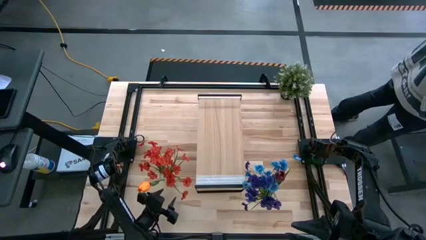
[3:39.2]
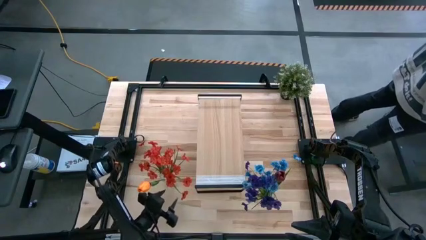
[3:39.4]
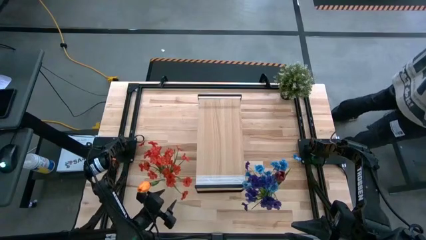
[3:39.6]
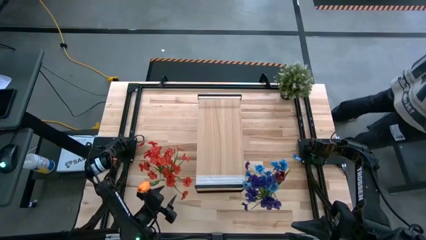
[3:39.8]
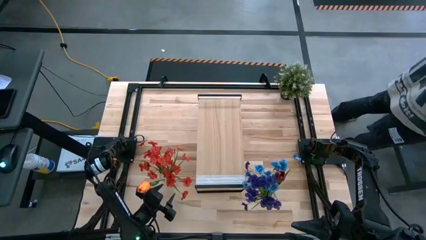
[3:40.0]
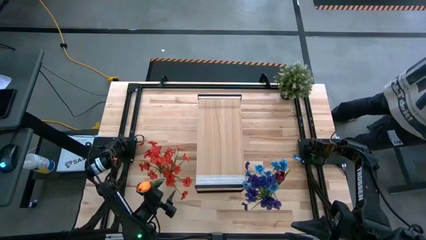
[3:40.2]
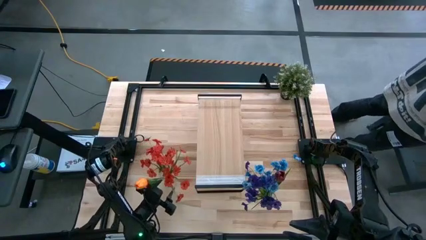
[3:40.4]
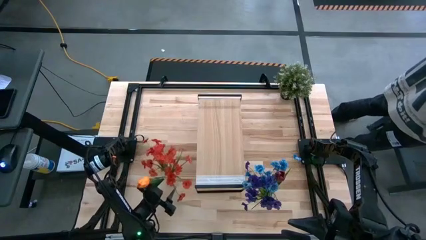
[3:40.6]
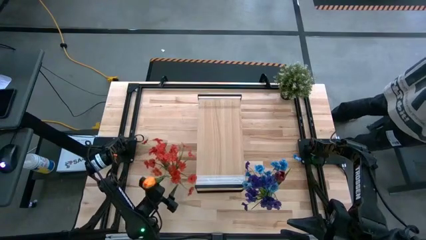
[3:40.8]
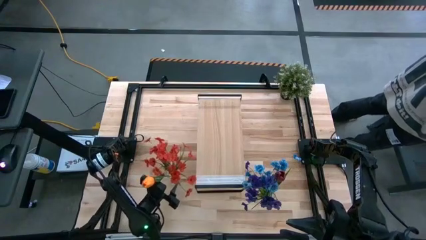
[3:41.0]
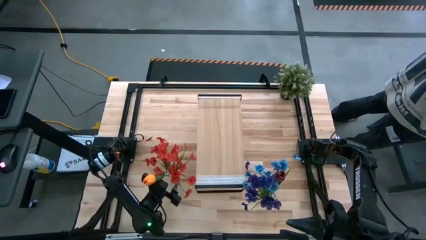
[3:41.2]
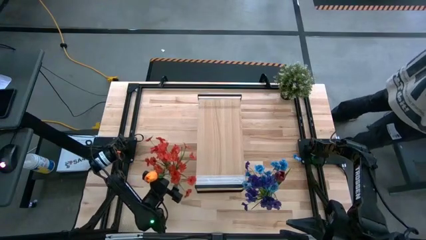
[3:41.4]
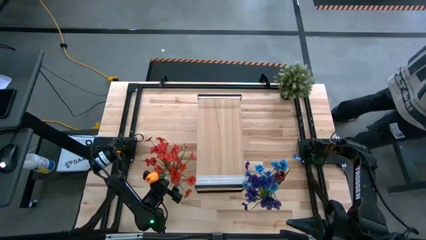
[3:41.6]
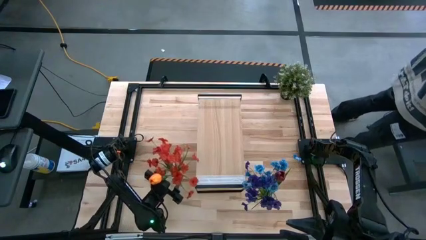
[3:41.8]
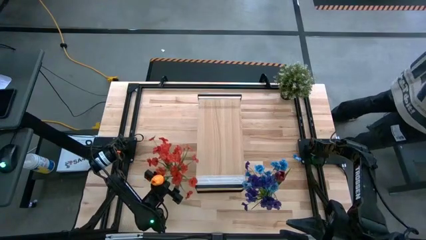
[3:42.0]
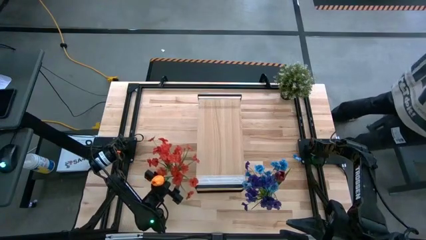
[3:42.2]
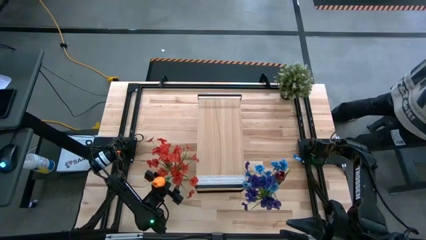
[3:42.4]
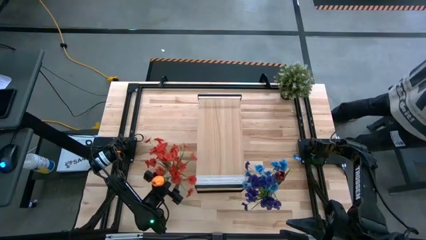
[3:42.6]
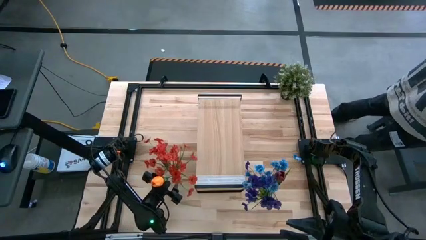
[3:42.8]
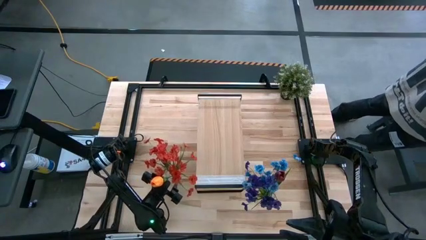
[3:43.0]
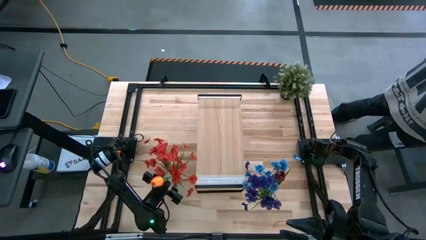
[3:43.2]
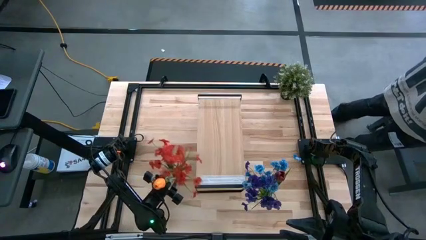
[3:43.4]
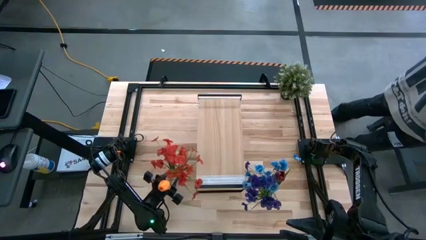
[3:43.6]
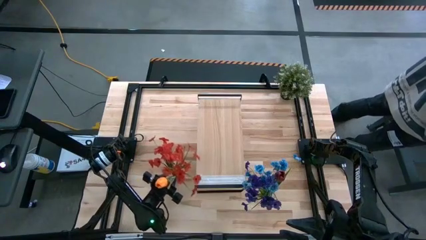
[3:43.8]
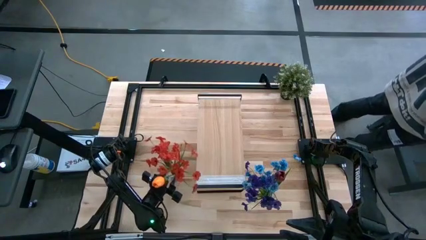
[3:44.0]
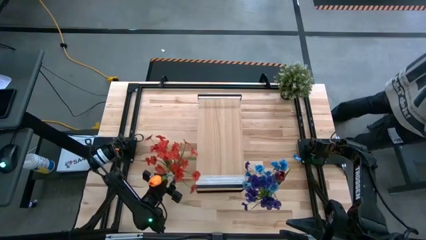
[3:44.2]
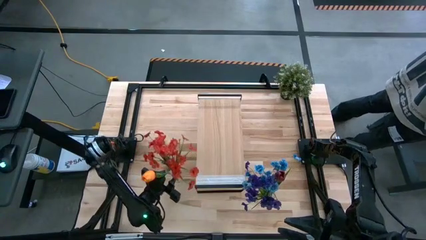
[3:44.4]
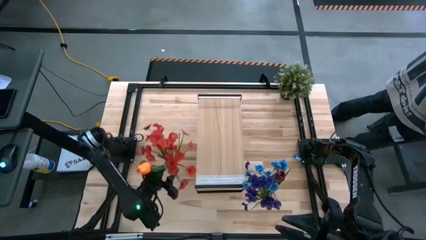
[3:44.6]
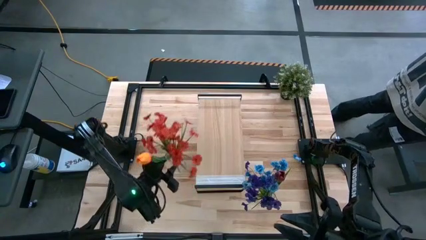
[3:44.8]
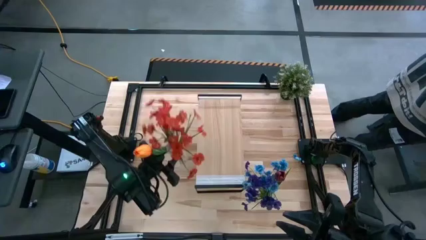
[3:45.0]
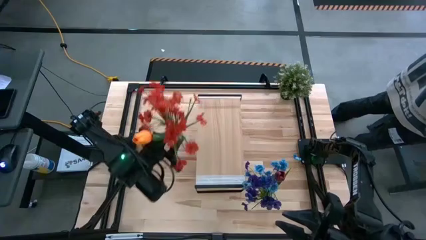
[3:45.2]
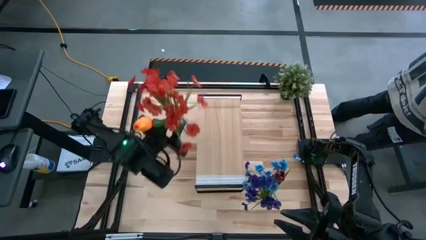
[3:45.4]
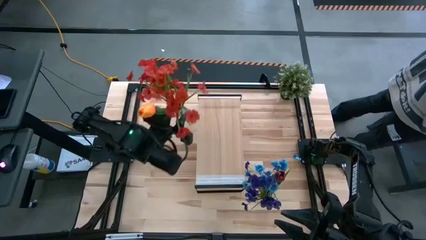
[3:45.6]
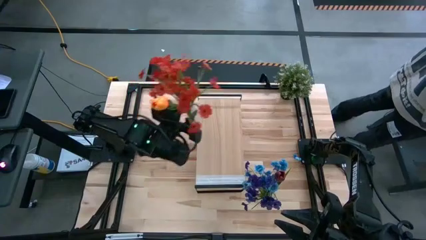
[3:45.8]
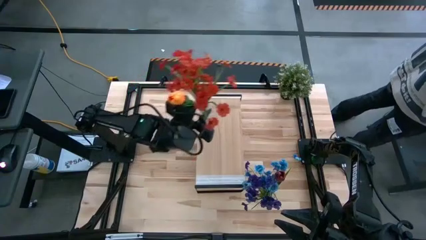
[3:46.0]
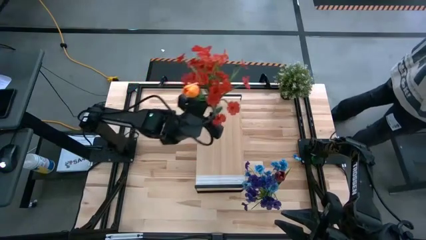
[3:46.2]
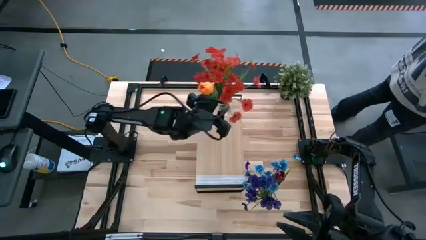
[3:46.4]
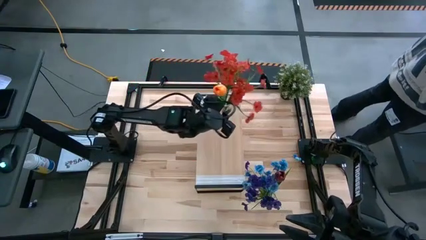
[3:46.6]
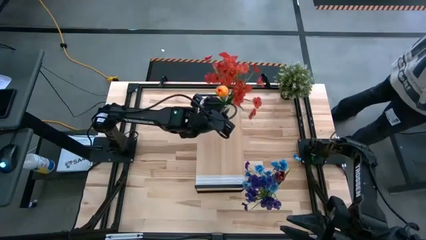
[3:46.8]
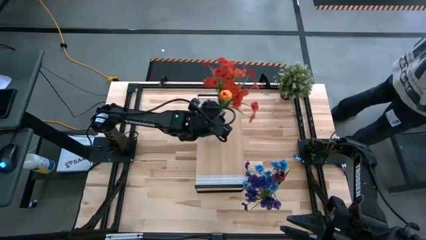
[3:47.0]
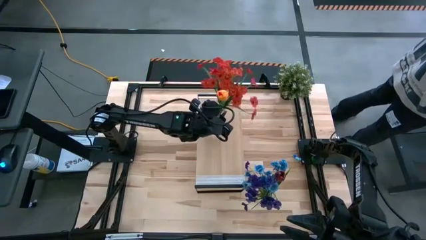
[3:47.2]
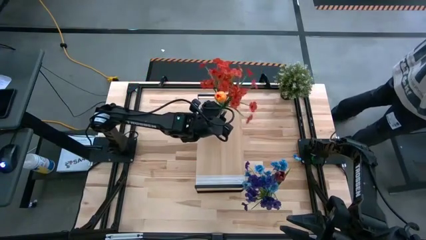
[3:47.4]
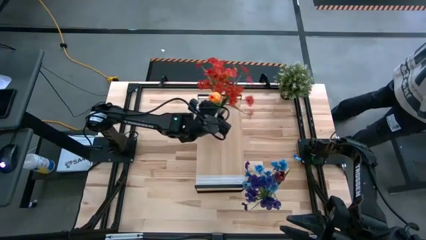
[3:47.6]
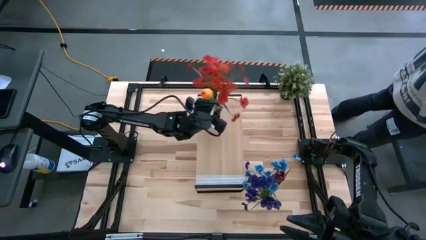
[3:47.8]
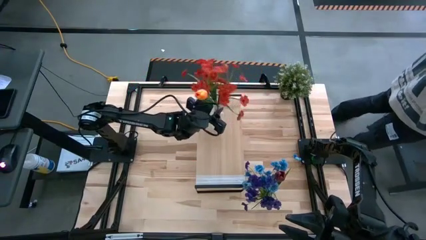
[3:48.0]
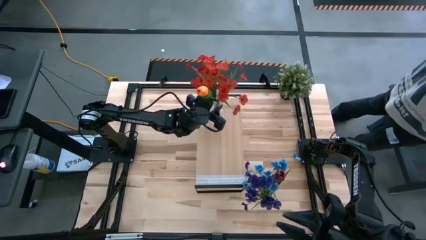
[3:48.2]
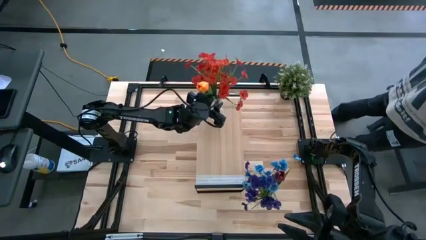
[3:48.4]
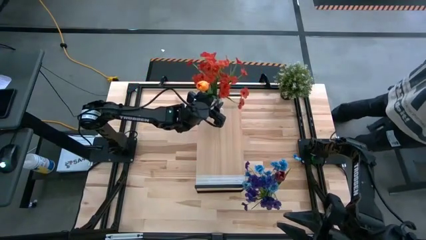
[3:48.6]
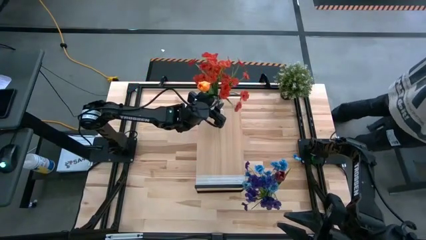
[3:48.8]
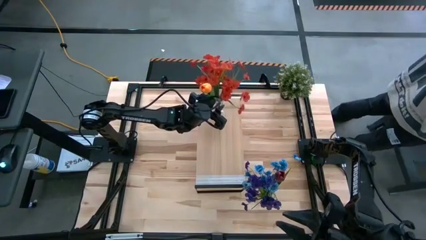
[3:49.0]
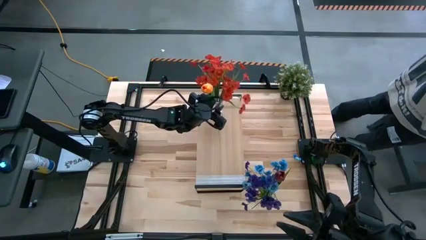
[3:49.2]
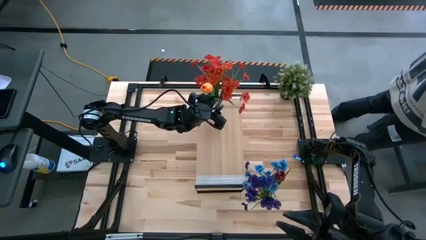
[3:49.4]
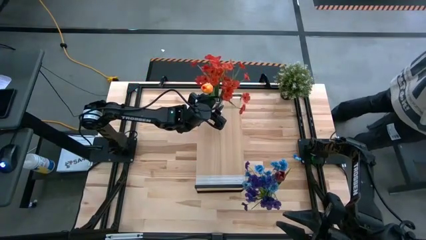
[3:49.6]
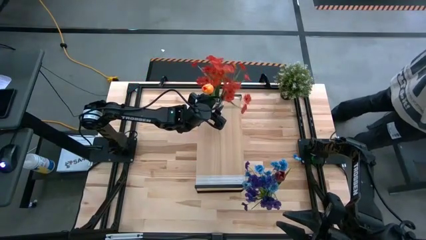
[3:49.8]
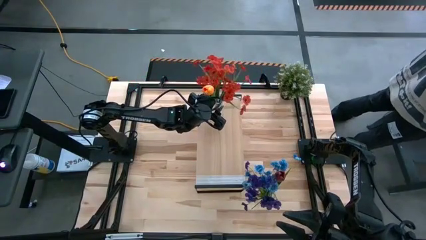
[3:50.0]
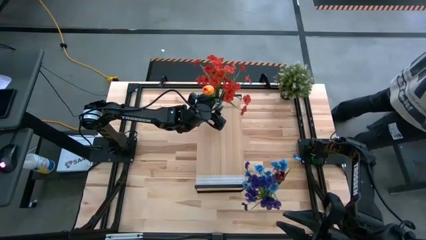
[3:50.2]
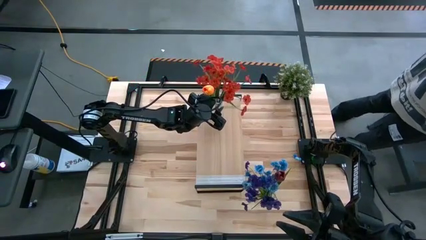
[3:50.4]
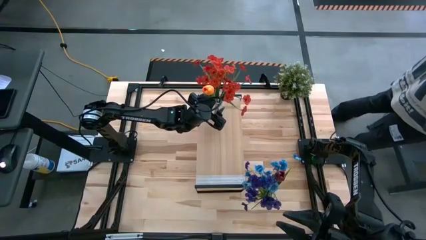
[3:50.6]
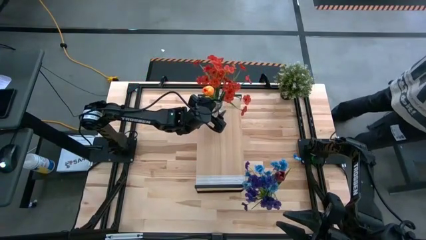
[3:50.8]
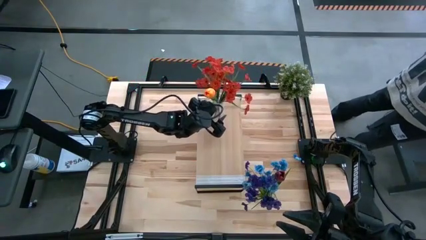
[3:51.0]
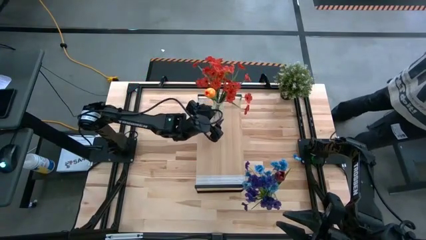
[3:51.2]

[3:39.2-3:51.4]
Task: Pick and place flowers into a vace then onto a shelf
Put the left transparent vase with flowers on the shelf

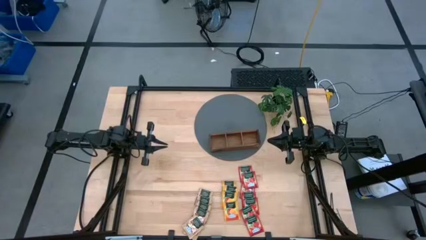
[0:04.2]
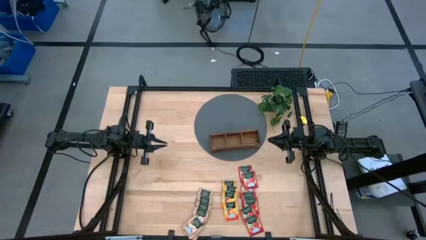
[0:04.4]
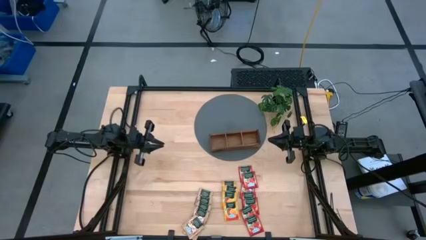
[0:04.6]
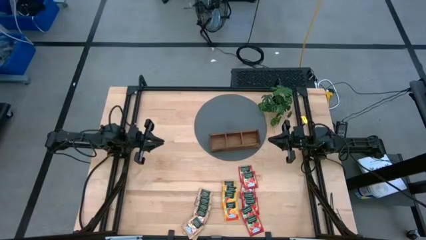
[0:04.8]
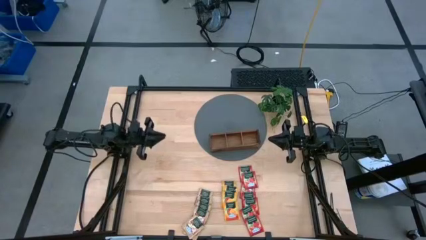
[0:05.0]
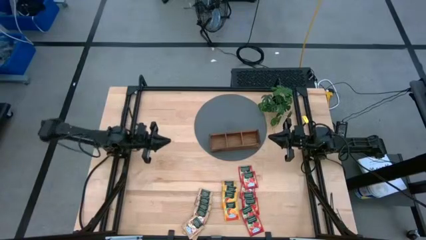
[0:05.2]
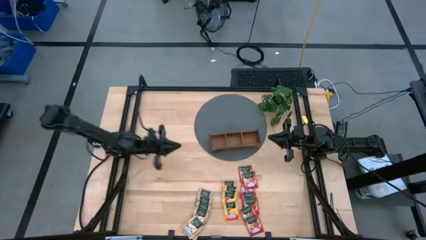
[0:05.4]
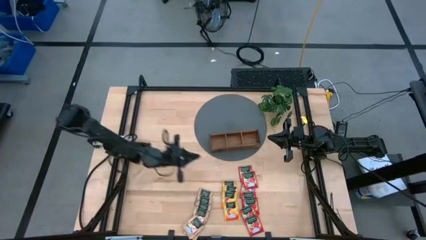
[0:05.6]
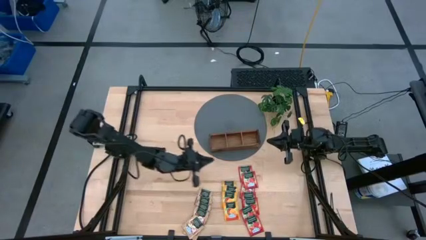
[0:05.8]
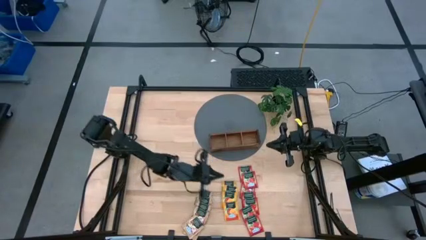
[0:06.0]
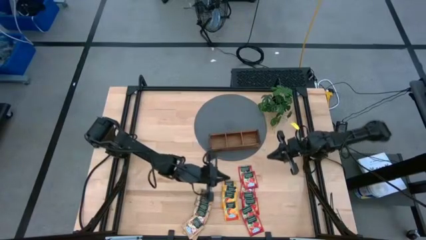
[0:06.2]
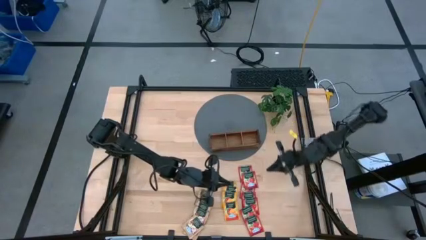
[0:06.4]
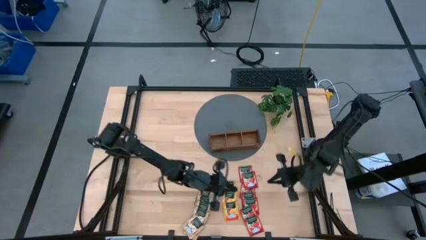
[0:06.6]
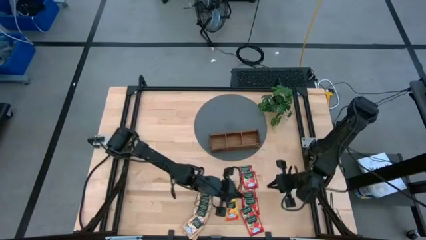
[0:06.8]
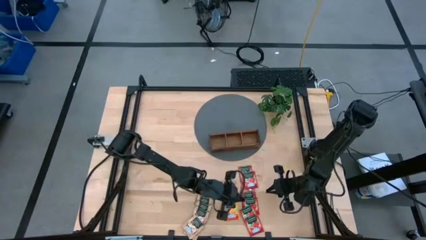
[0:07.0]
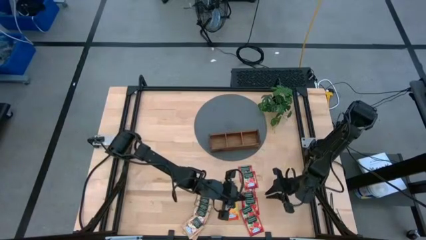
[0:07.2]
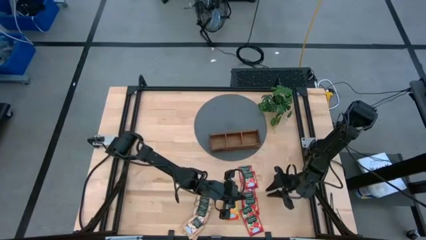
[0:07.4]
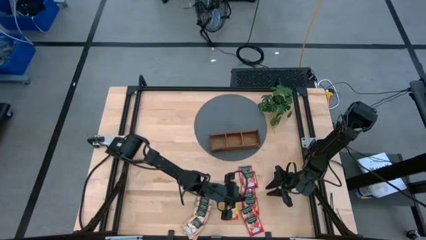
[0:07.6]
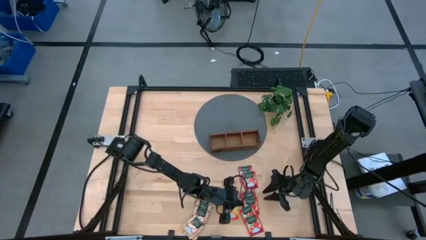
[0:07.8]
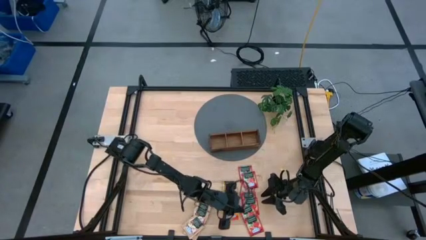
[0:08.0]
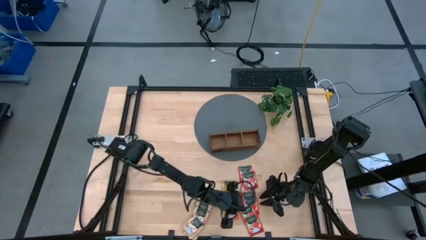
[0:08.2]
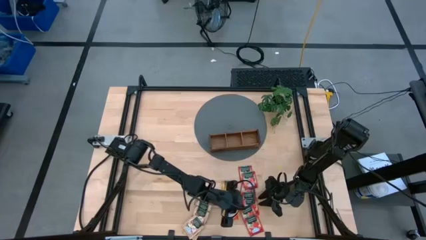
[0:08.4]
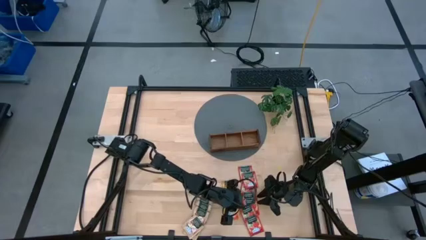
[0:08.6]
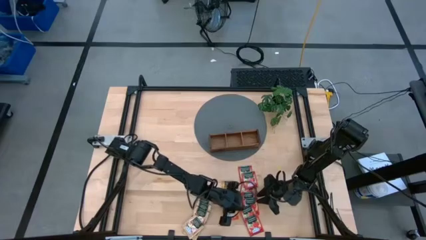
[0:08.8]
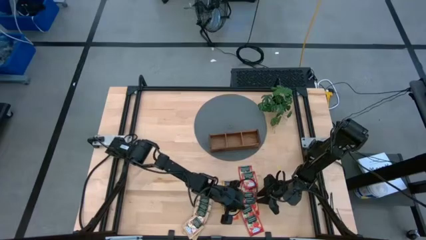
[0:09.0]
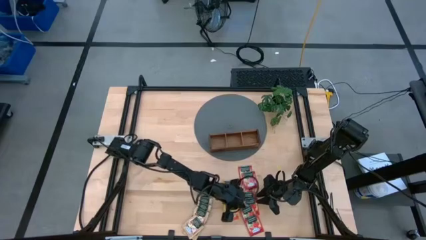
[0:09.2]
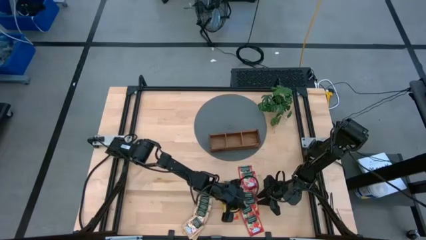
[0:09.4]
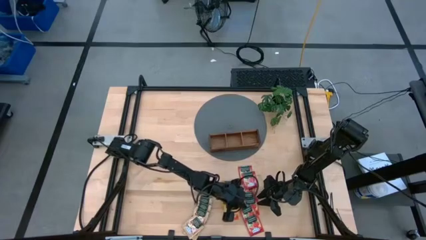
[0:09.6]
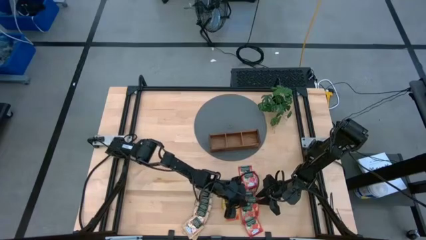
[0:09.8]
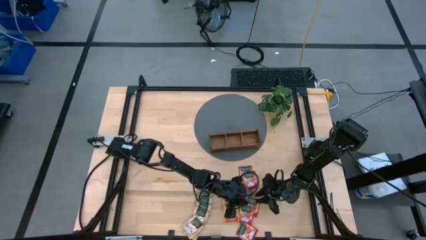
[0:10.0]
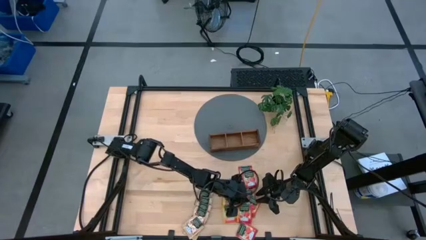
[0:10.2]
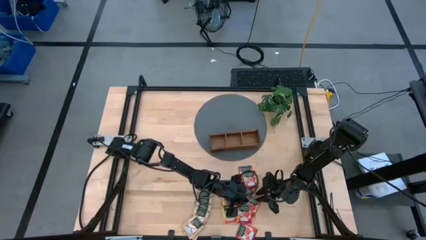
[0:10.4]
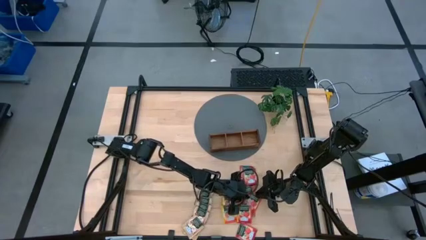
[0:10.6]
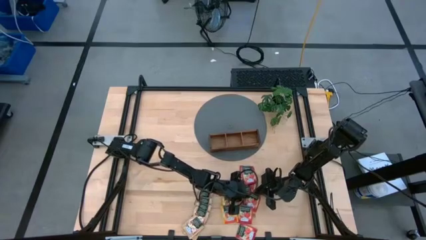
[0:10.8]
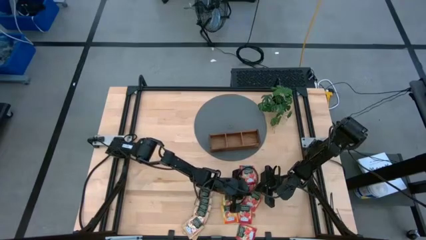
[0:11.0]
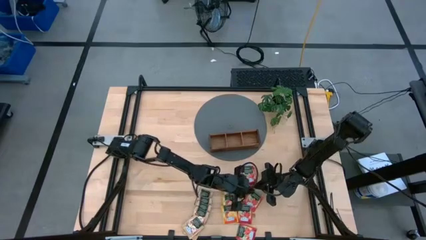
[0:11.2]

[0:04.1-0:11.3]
Task: Pick & Place Tea
Put the red tea bag into the right section of the wooden organizer
